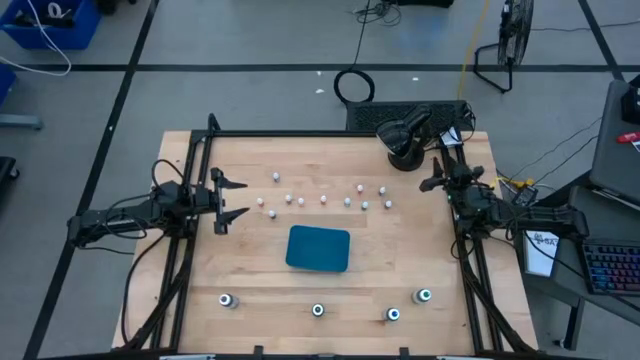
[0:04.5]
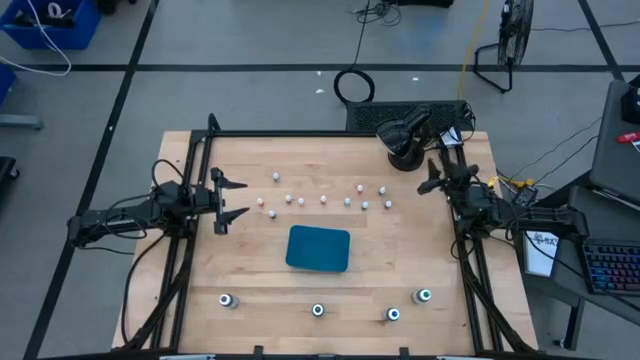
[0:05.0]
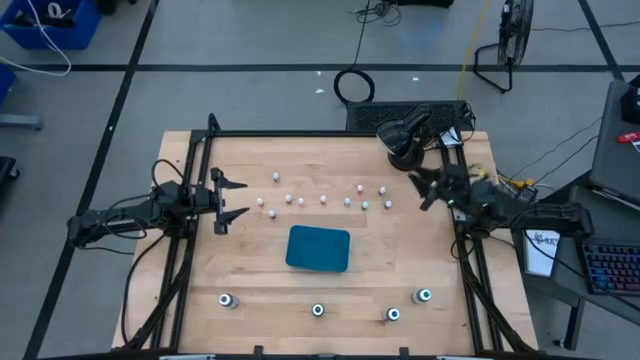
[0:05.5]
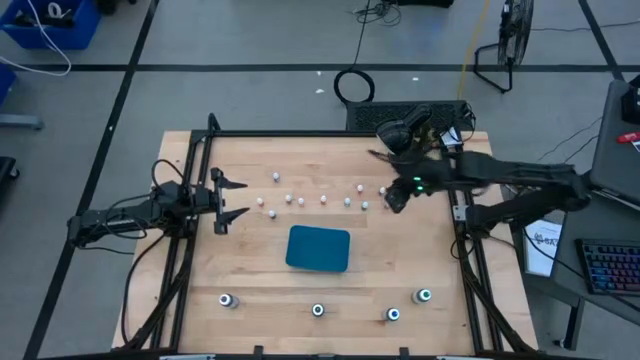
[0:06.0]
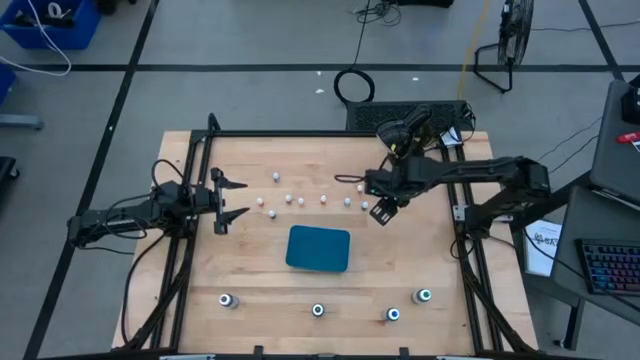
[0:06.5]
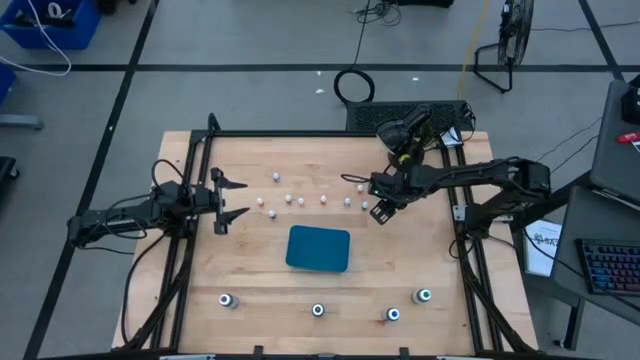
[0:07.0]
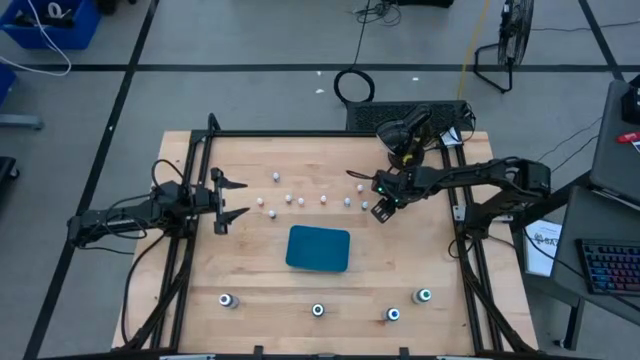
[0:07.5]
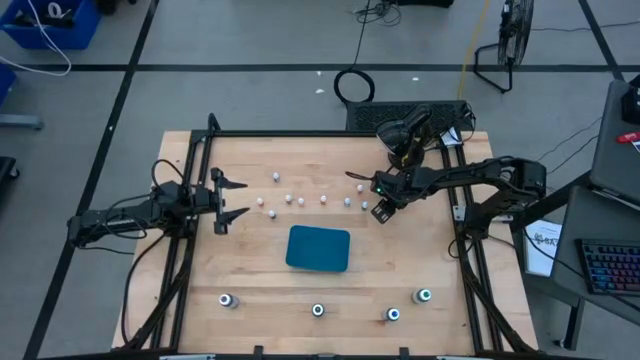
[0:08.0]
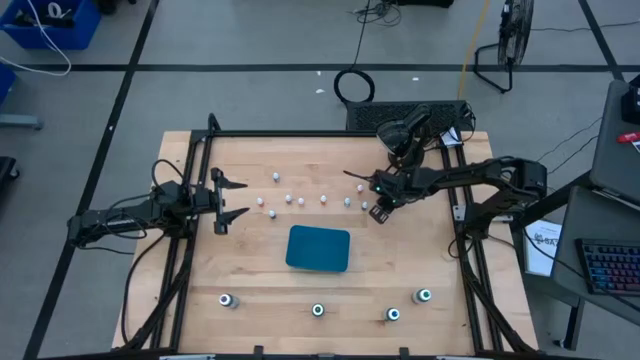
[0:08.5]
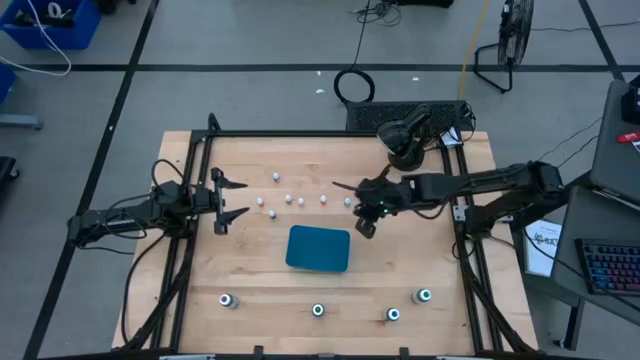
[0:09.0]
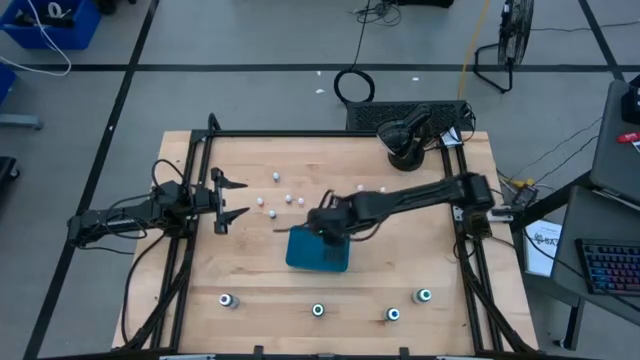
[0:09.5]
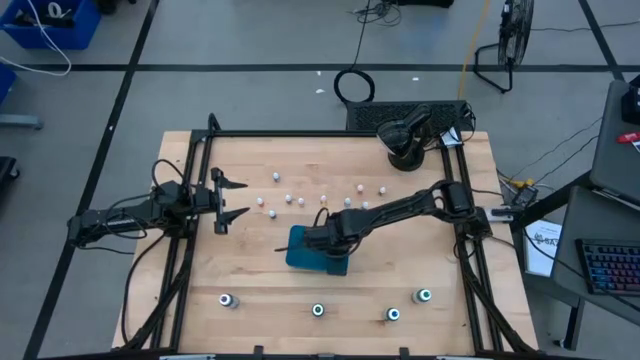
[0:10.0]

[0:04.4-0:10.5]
Task: Pick & Place food coloring
Put the red food coloring bottle into the blue bin

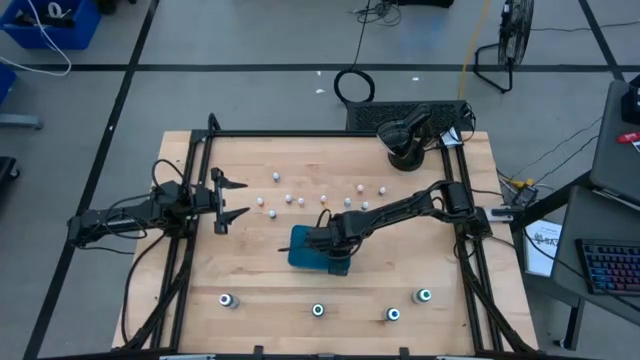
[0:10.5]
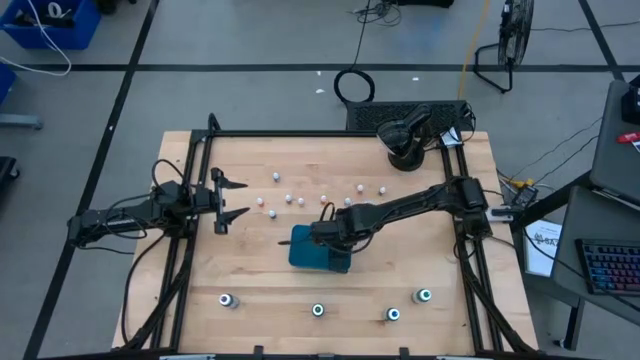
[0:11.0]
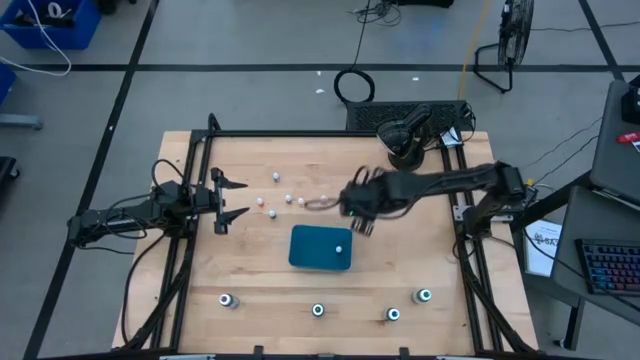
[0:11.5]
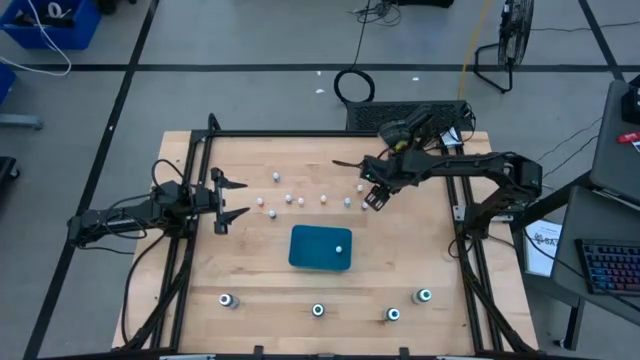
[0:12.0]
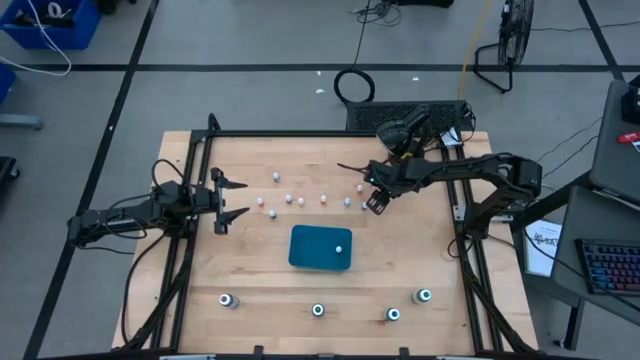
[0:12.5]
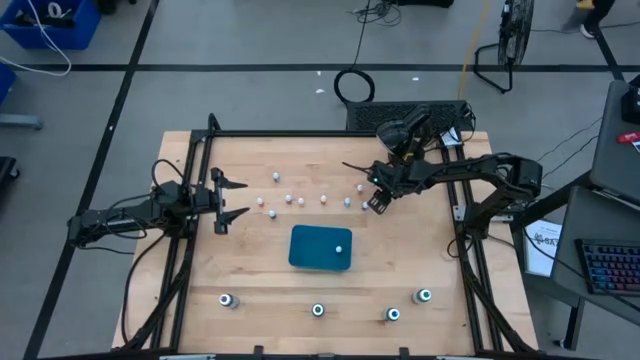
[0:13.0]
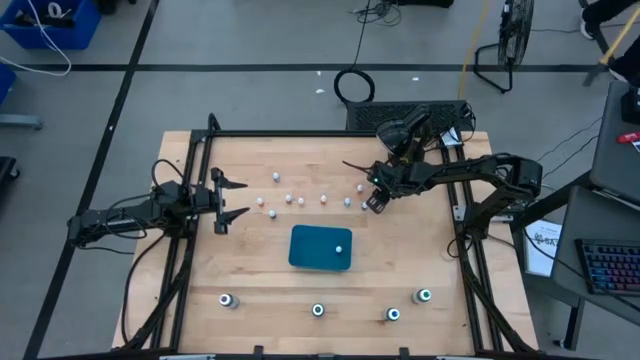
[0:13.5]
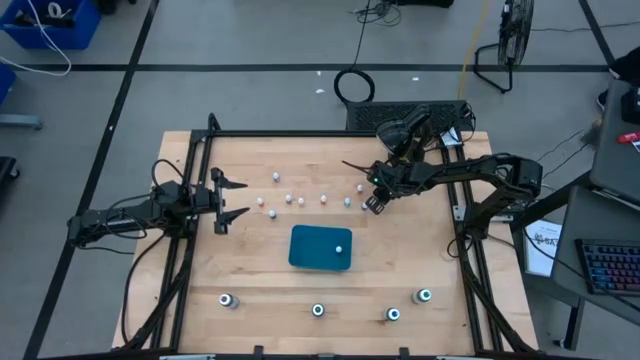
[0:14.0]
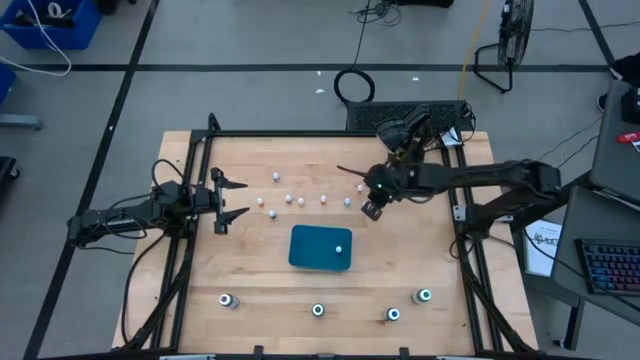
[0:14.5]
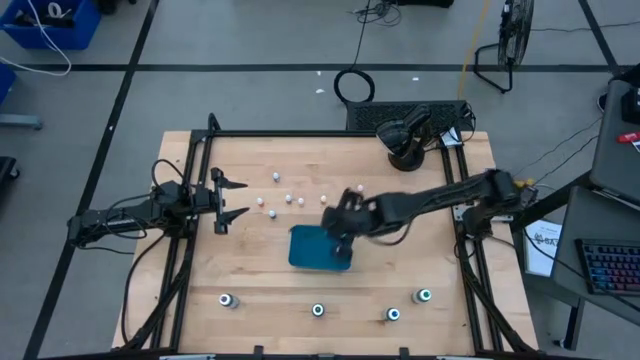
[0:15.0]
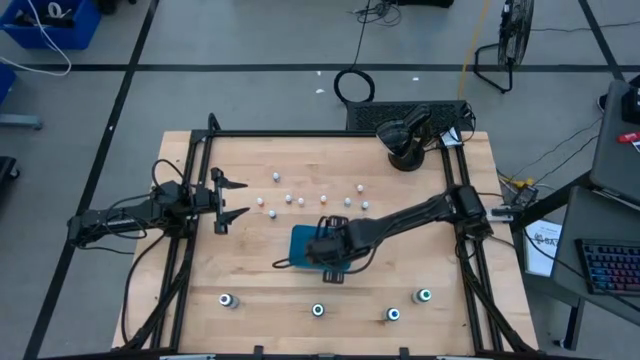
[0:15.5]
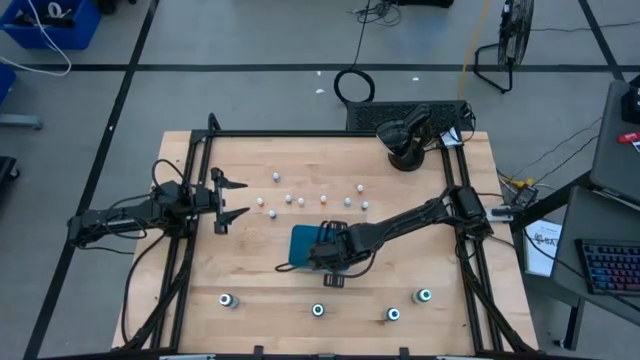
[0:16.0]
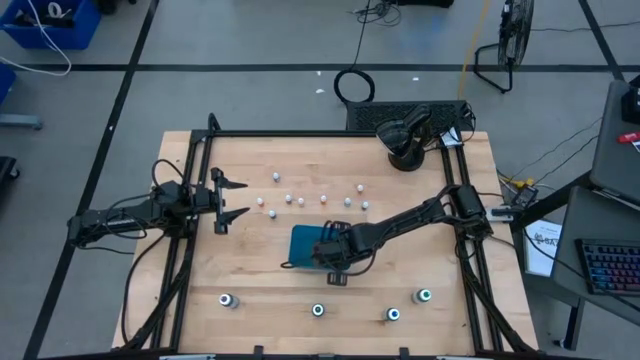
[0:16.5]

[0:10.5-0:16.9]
Put the purple food coloring bottle into the blue bin

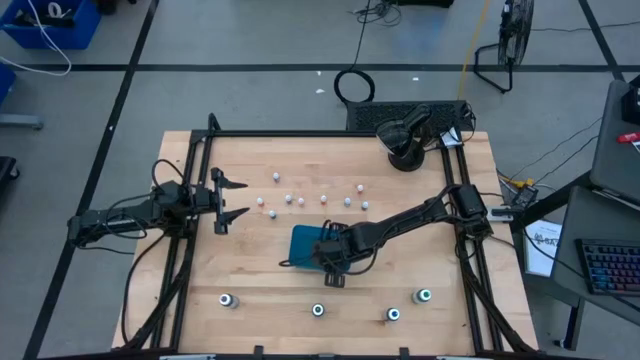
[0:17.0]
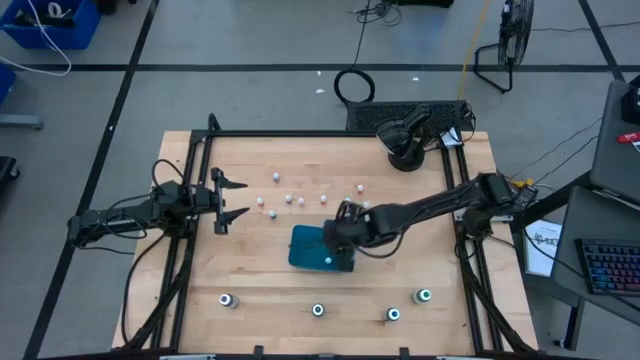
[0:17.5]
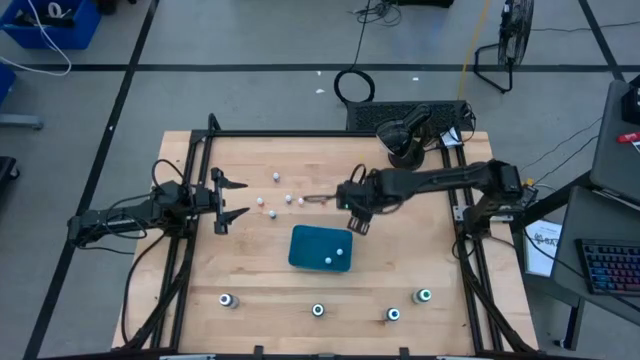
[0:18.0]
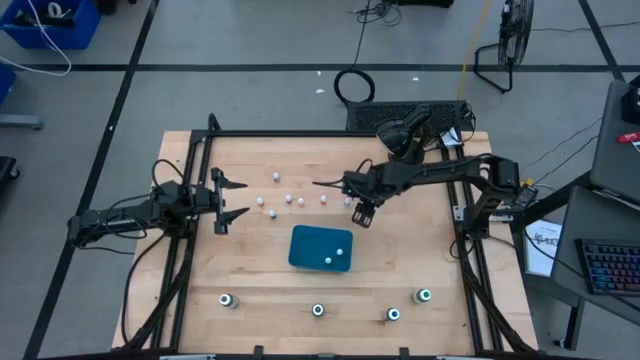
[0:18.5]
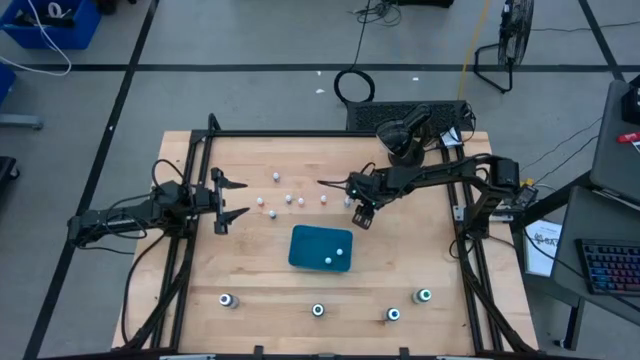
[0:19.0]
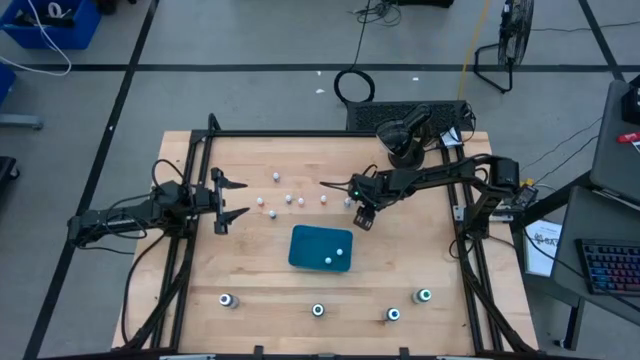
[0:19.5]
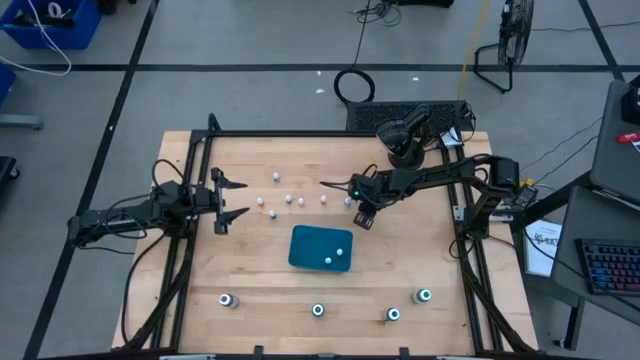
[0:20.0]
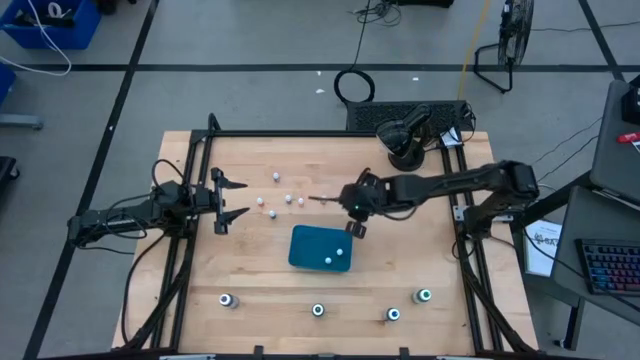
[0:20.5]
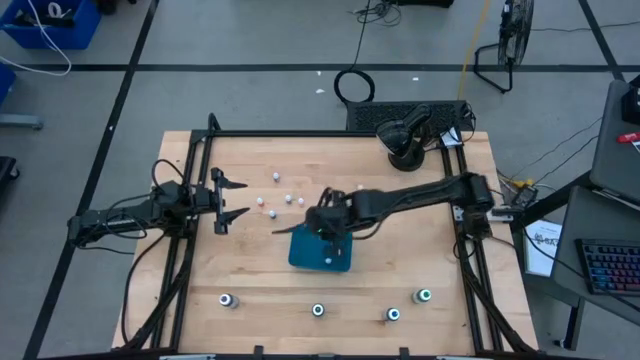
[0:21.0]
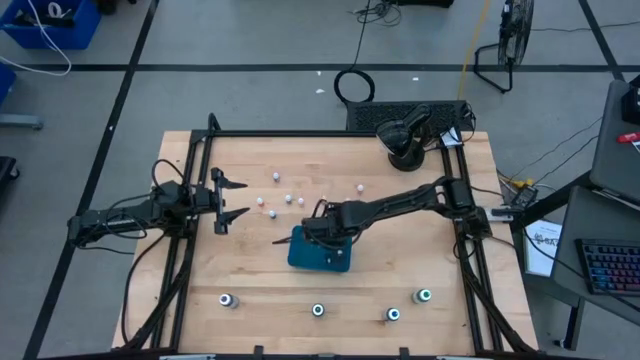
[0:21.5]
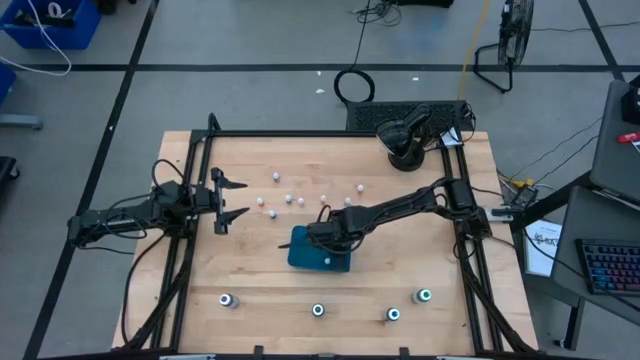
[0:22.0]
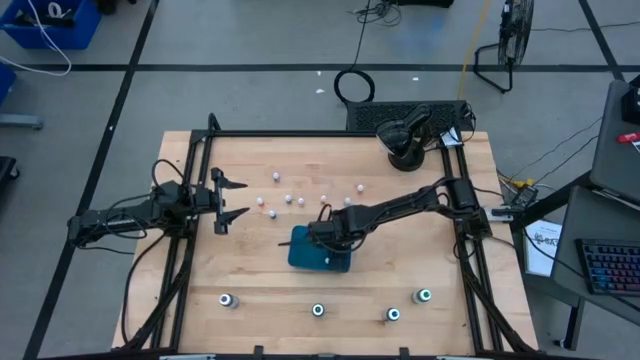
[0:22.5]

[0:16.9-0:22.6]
Put the black food coloring bottle into the blue bin

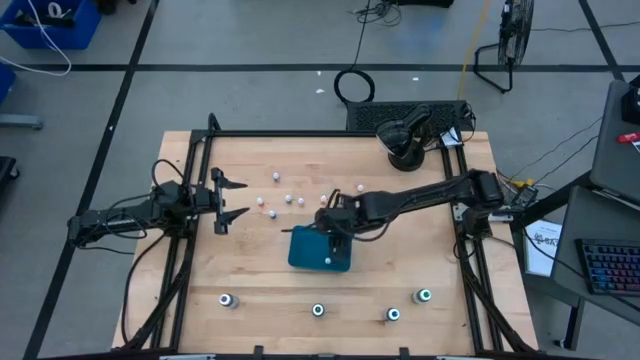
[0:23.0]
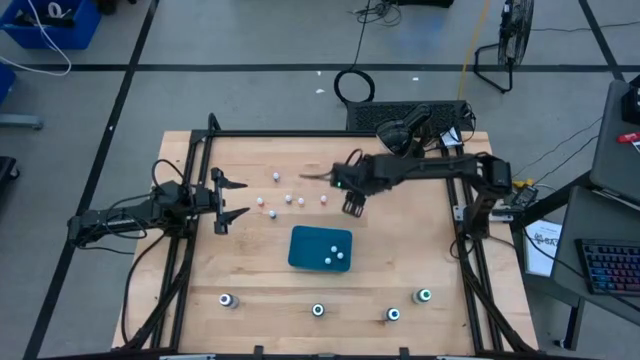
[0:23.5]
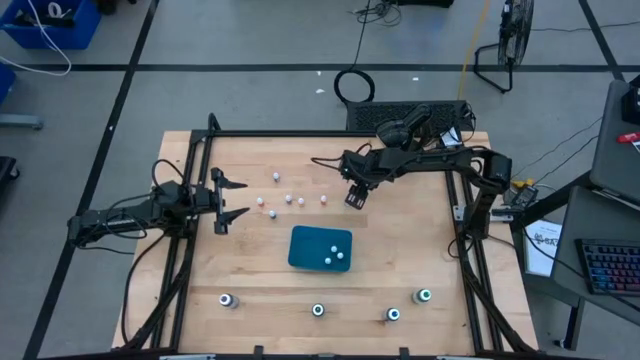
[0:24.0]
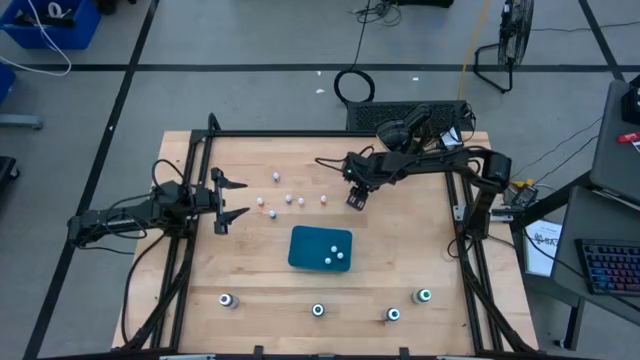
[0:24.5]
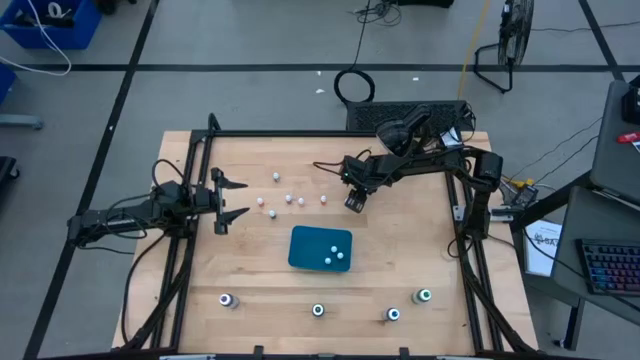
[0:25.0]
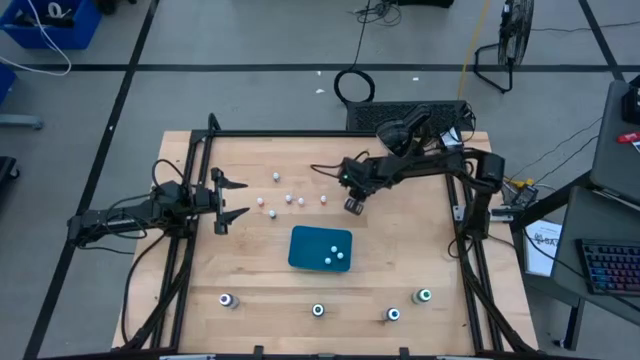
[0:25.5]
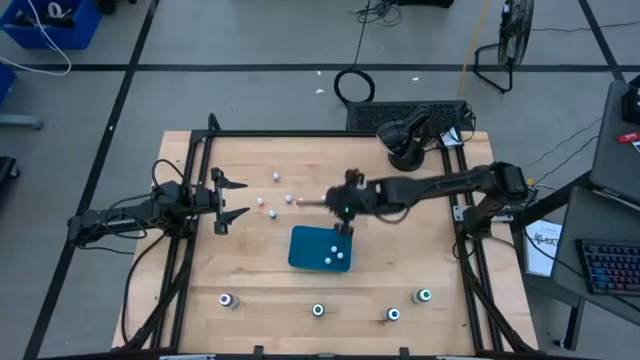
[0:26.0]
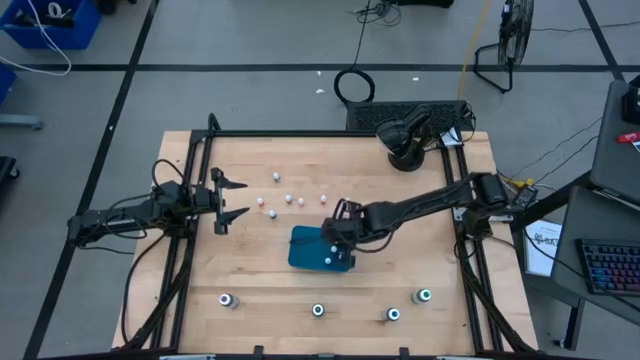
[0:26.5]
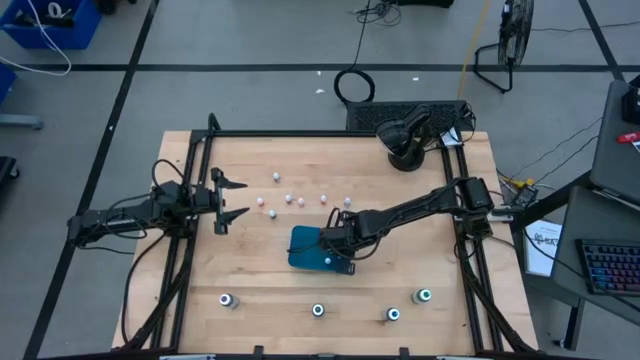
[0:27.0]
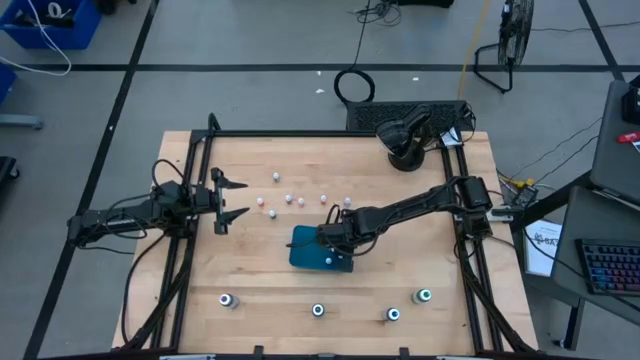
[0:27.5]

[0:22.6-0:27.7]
Put the orange food coloring bottle into the blue bin
